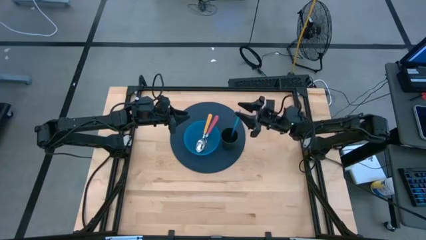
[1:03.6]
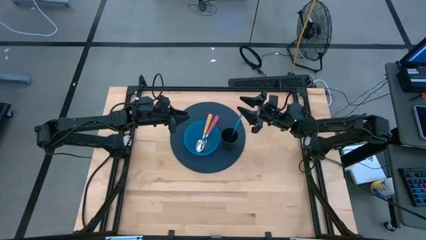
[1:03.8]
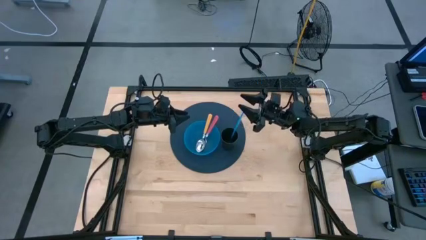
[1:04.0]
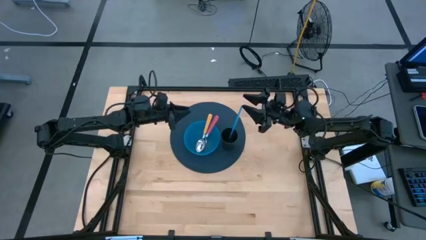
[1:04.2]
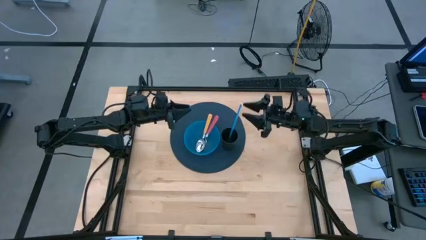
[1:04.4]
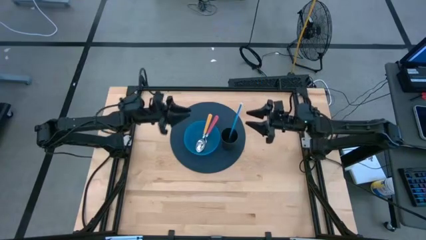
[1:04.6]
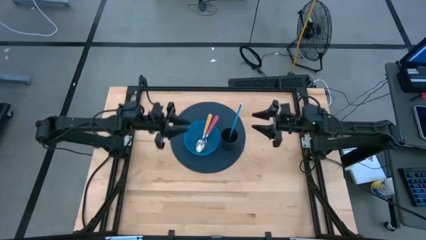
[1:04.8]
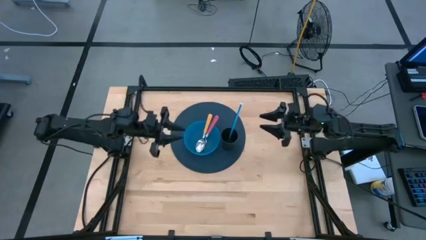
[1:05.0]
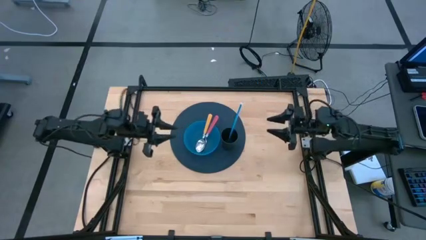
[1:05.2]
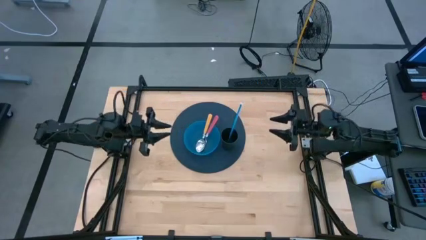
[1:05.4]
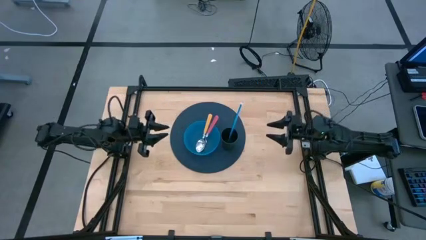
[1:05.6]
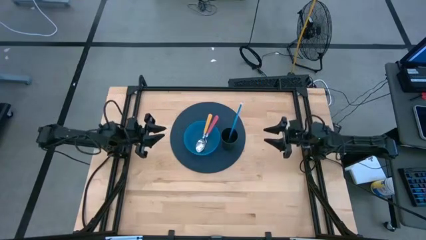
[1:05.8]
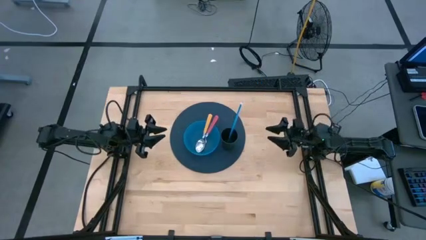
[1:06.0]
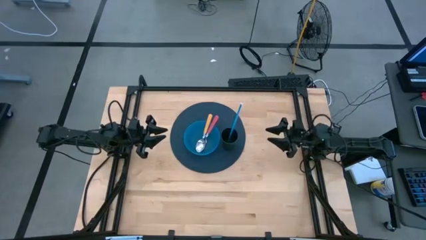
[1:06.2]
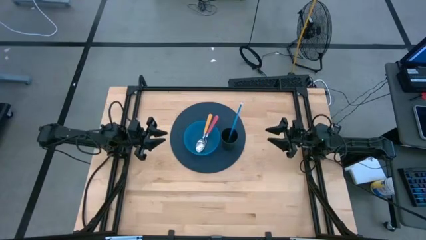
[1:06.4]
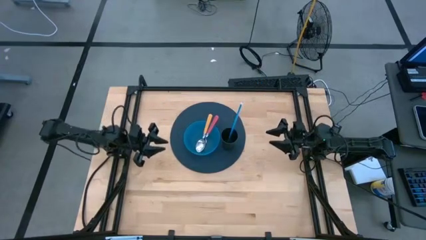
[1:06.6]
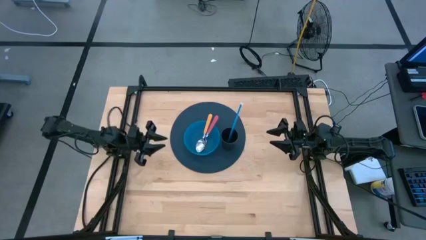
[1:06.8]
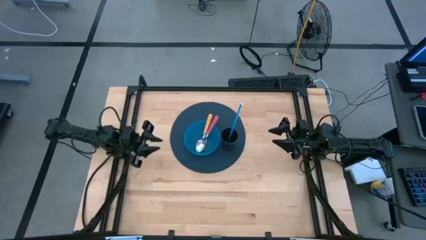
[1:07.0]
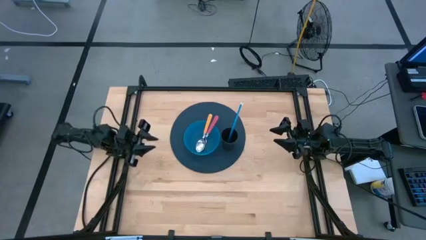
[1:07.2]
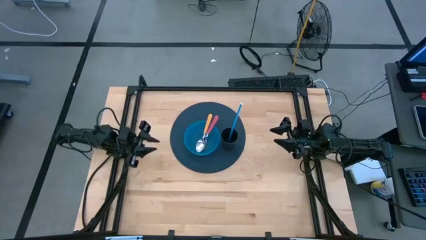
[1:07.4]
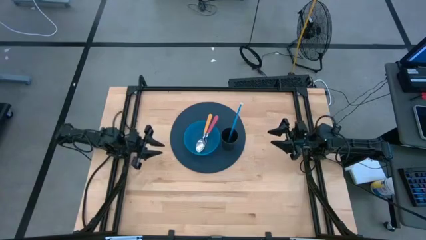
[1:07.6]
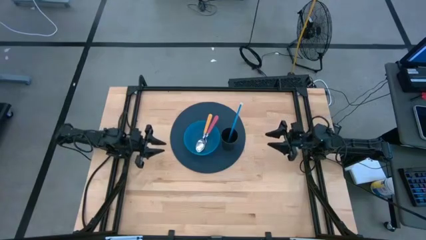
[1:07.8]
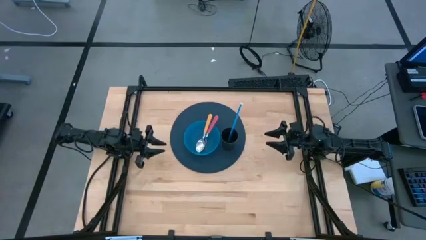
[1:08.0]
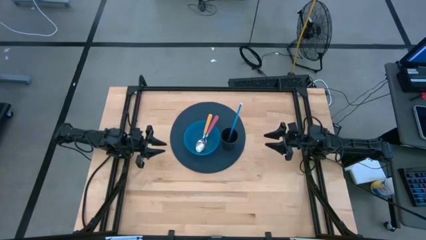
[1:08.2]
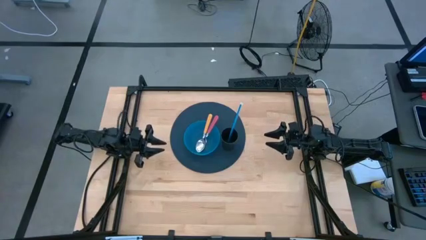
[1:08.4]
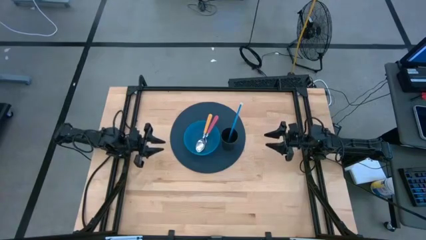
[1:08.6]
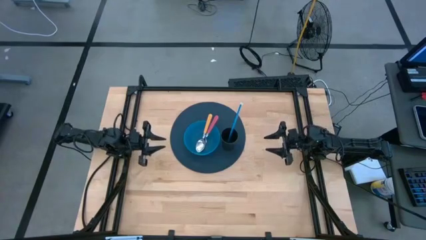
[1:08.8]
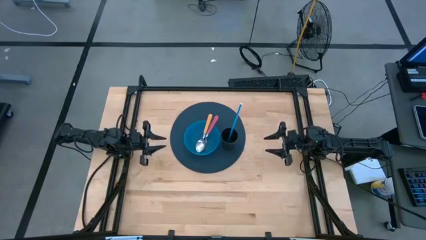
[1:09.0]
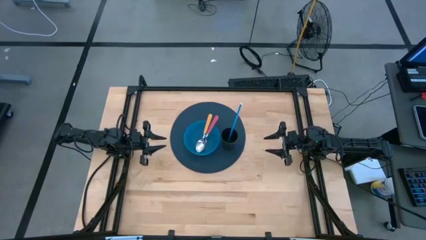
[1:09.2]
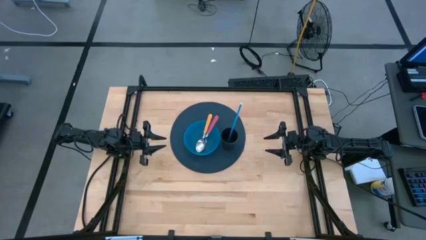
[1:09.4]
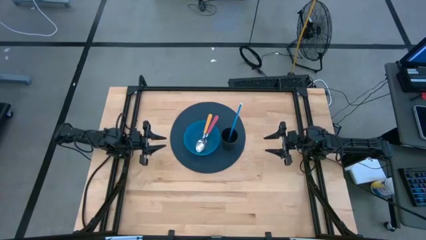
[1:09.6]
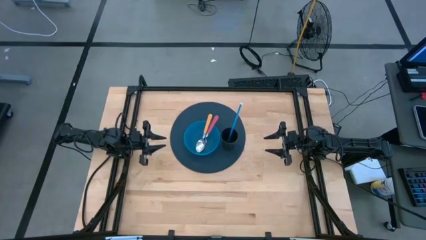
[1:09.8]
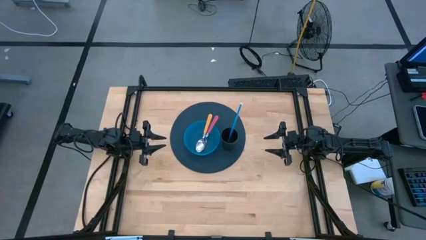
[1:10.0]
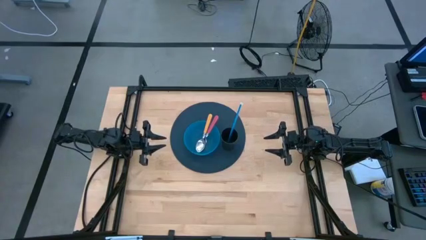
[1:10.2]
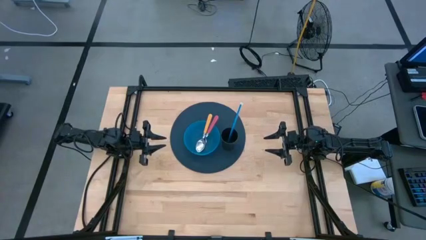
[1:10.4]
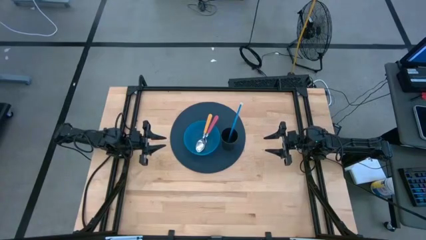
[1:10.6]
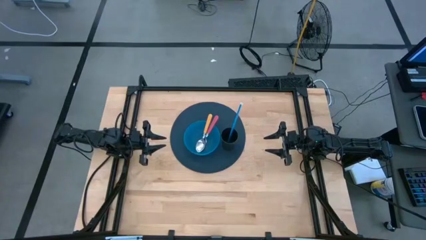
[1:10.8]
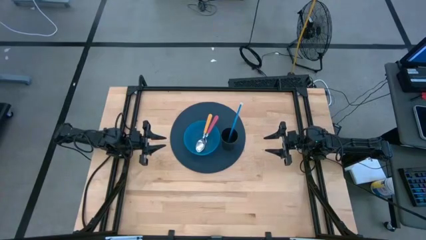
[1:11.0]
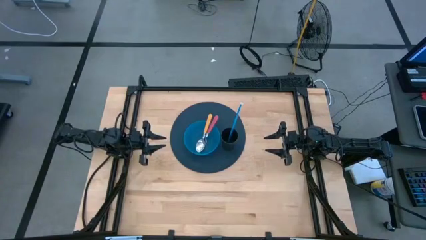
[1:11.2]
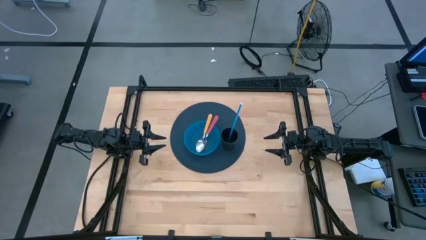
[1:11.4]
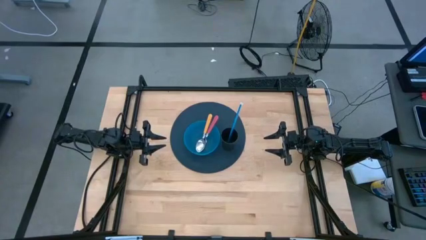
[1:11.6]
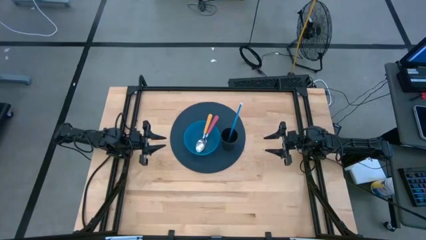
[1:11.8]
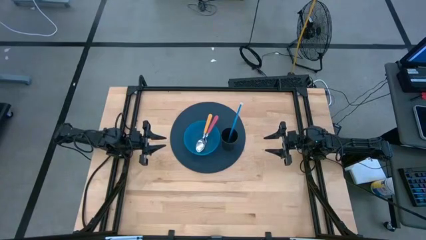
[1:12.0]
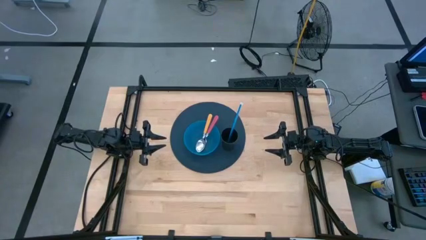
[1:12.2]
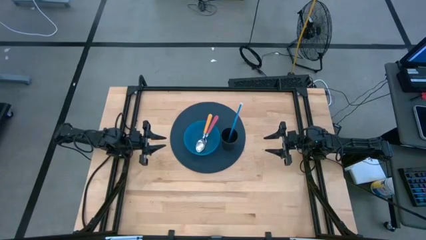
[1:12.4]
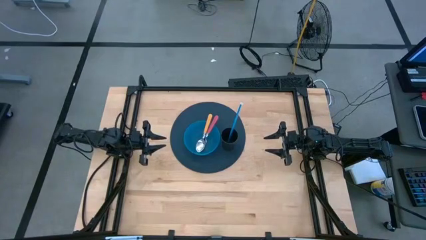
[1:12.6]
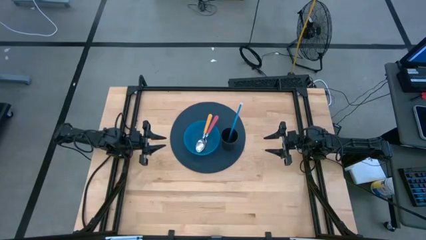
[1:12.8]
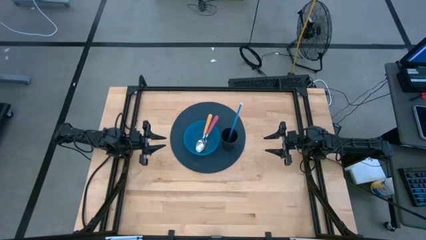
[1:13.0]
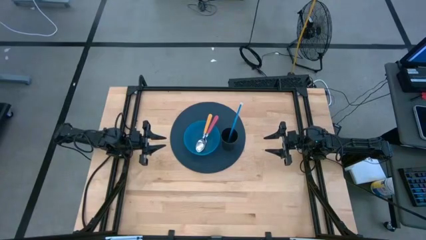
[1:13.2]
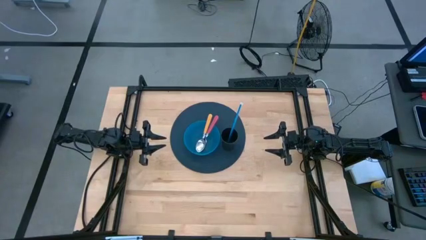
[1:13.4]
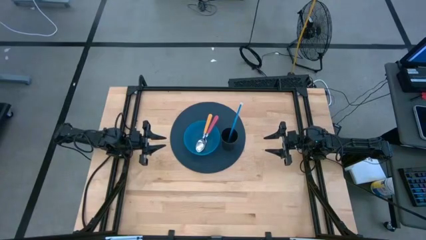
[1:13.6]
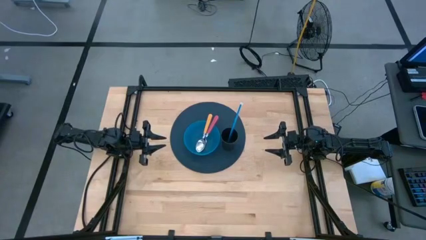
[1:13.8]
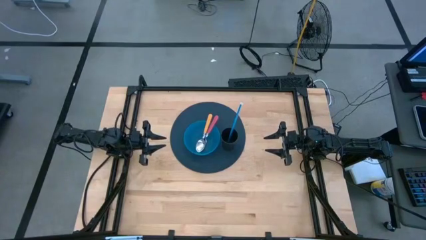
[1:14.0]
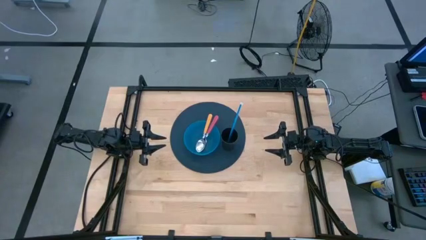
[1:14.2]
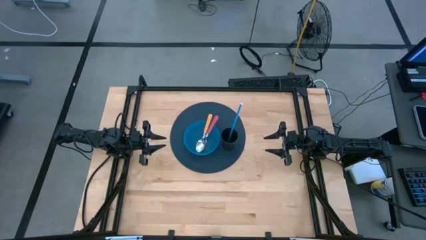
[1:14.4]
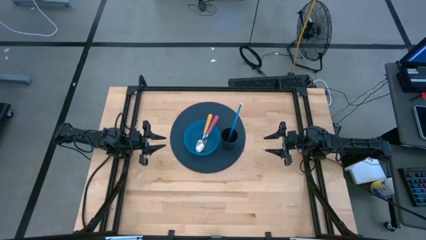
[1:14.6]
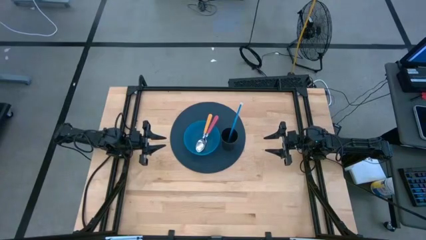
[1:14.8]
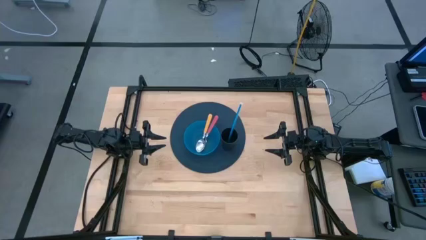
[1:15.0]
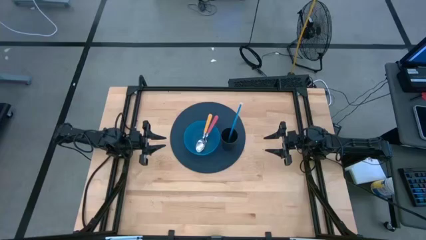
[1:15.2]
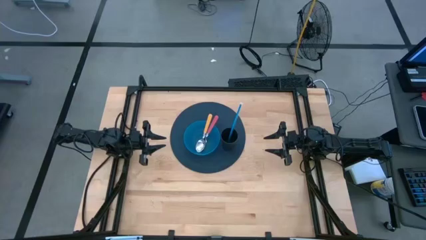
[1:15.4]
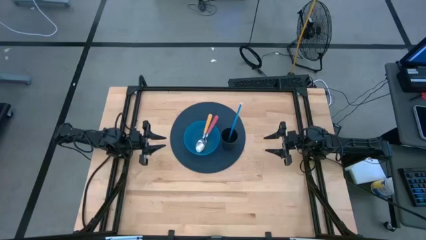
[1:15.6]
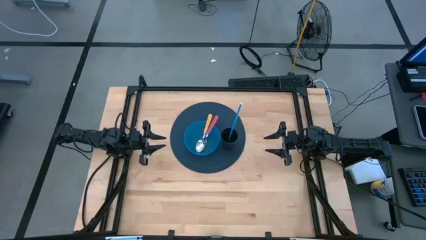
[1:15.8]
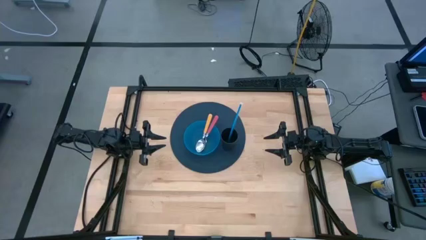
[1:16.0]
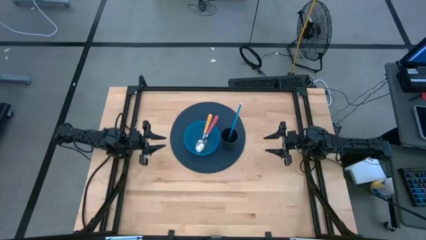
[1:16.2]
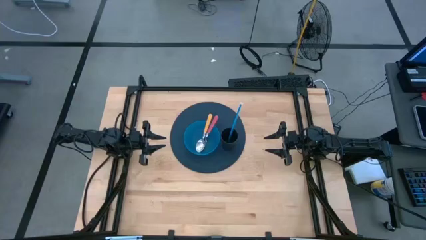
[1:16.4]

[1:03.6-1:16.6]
Task: Pick & Place Utensil
Return to Home Position
